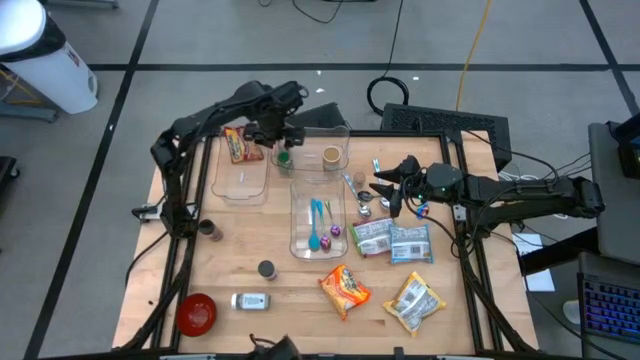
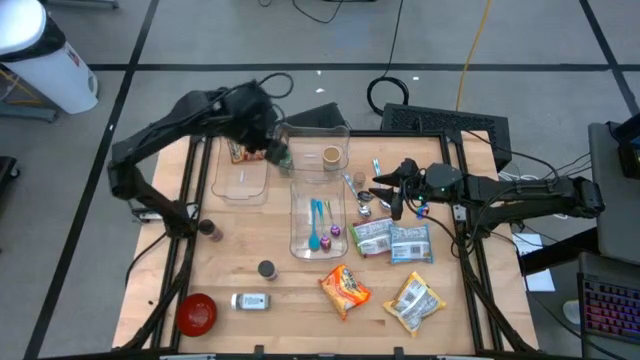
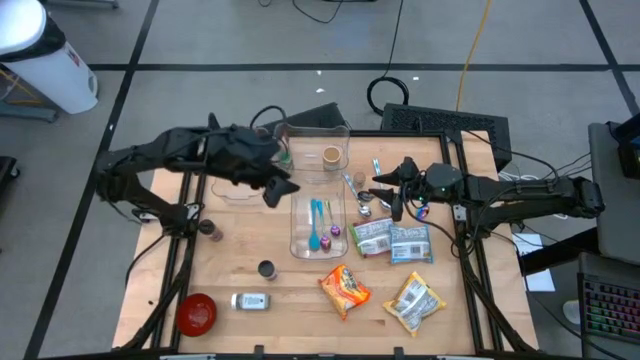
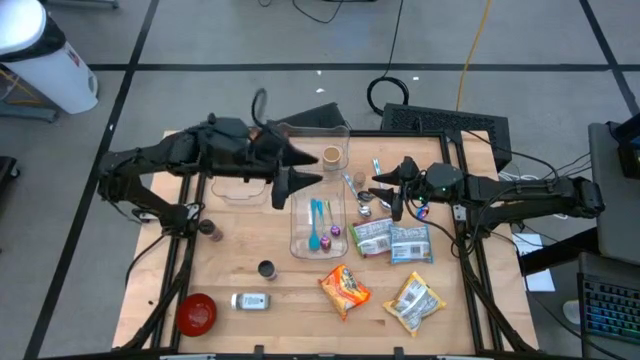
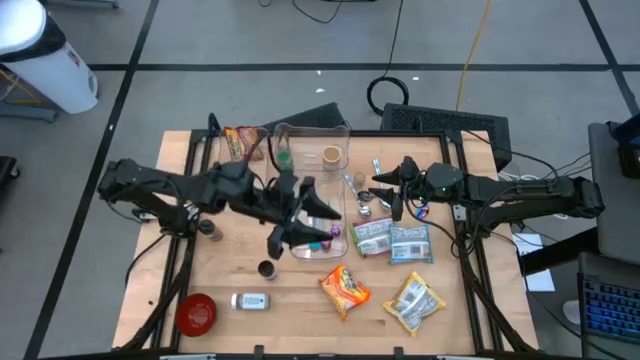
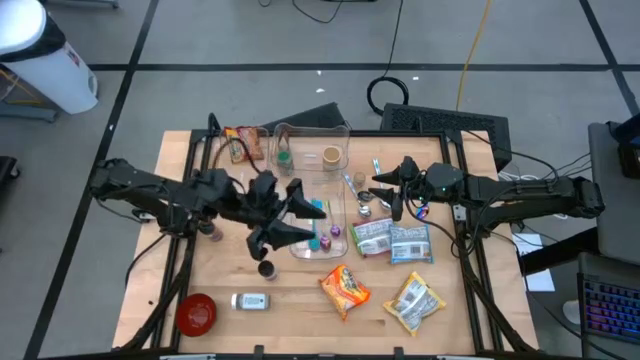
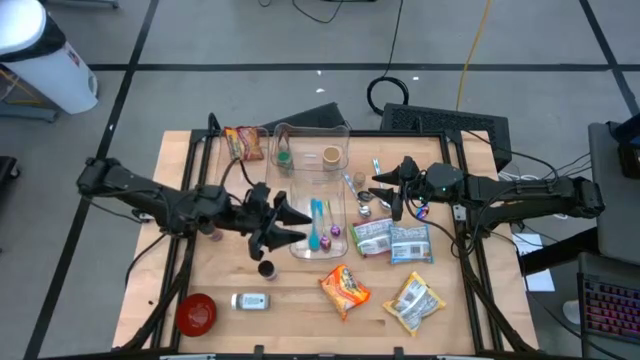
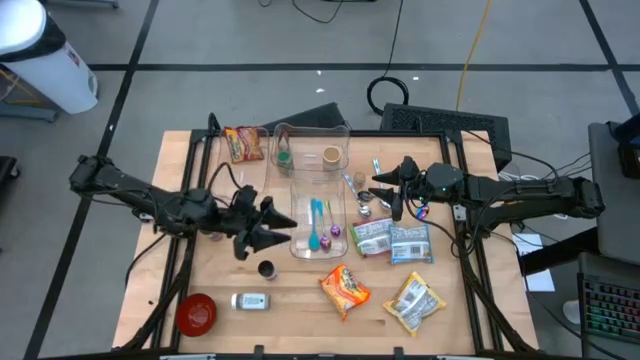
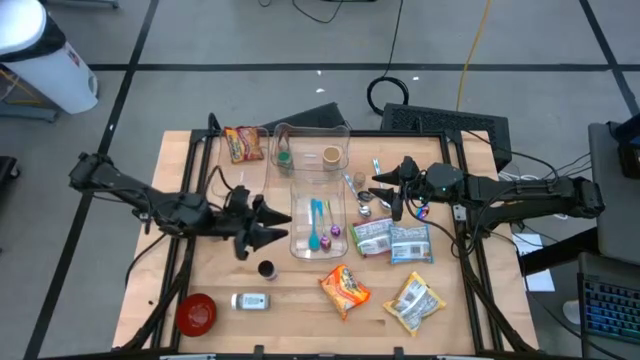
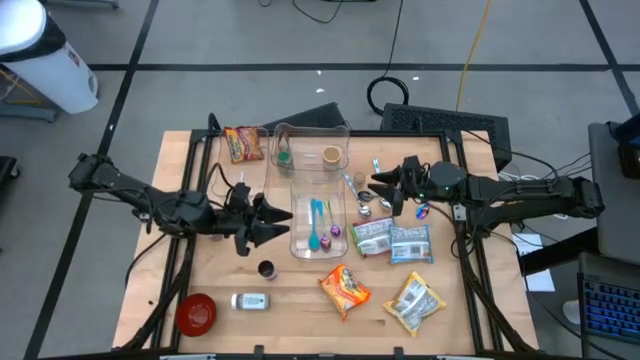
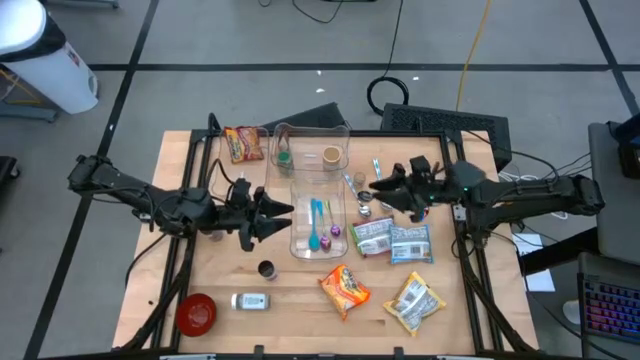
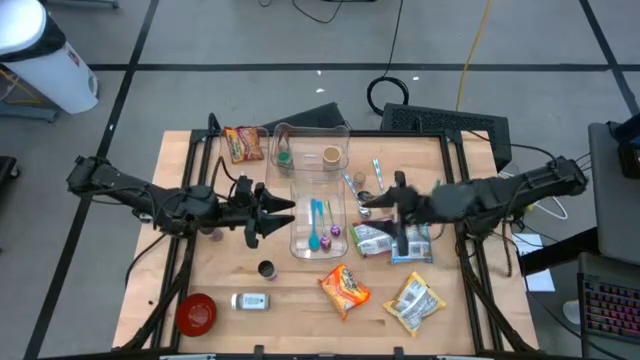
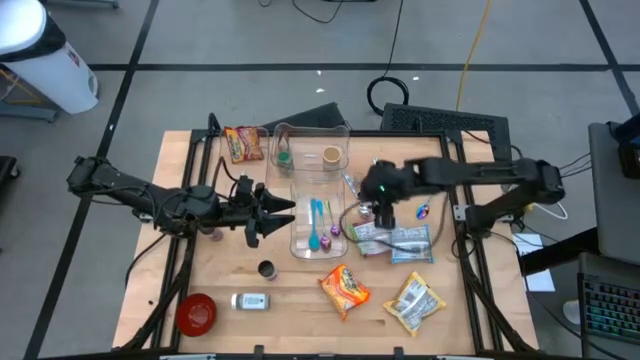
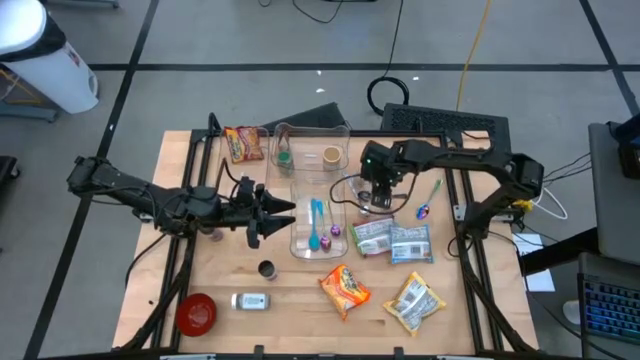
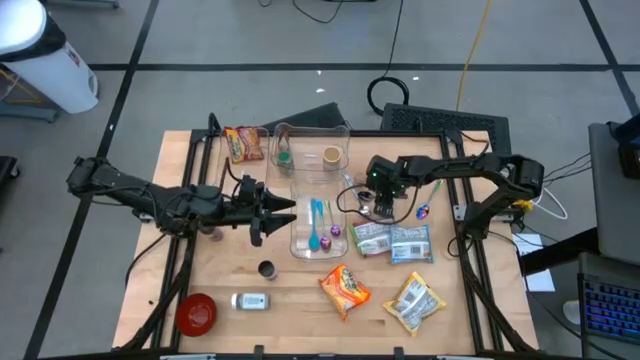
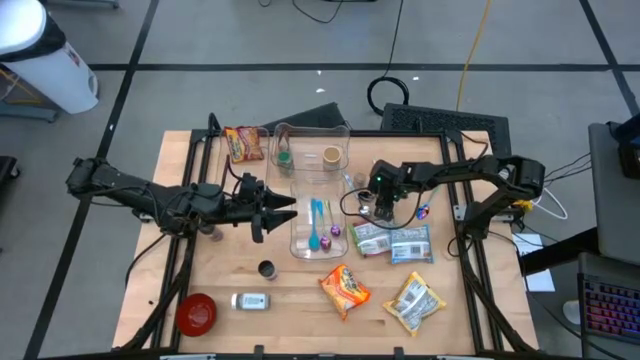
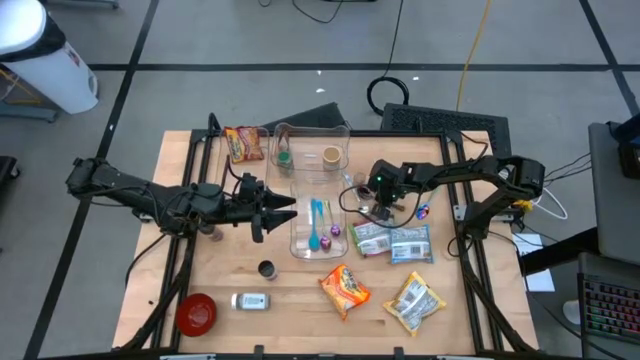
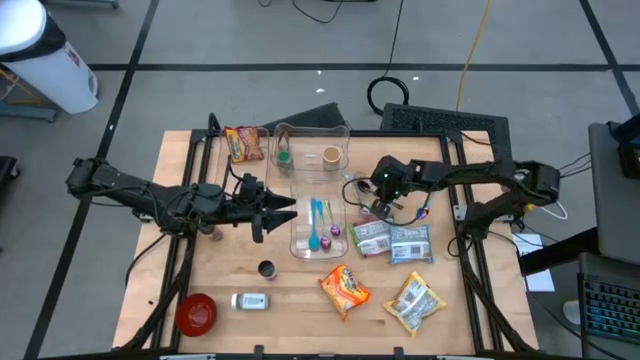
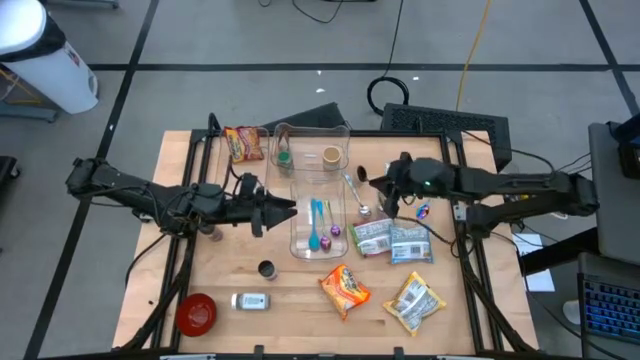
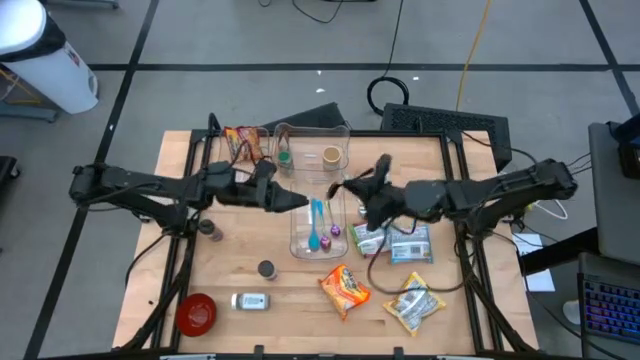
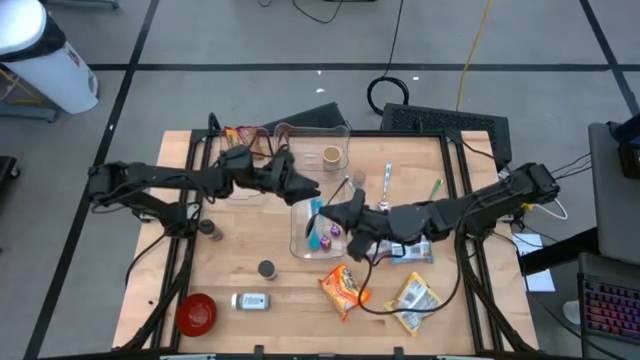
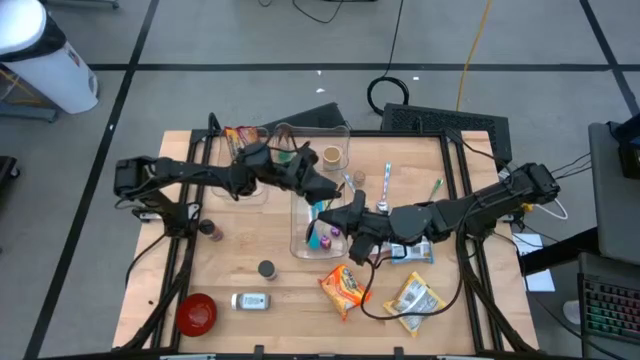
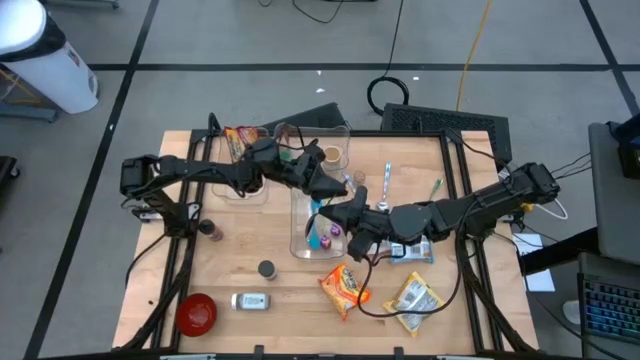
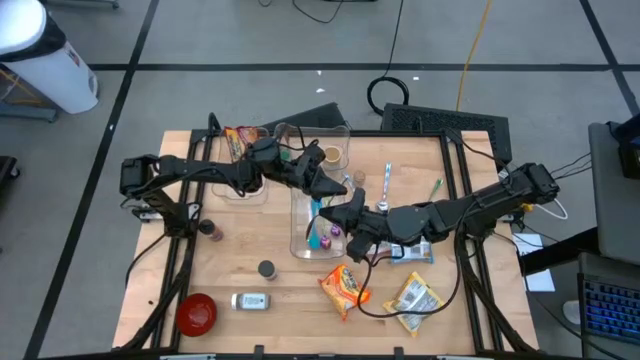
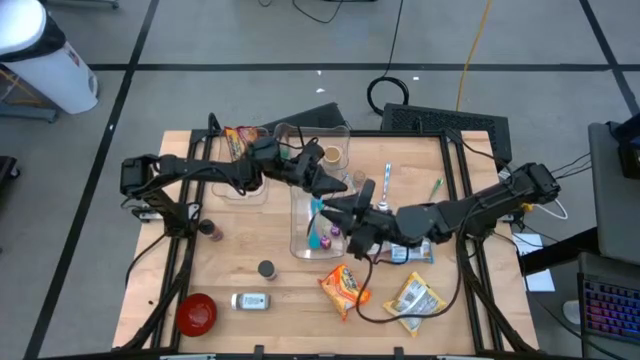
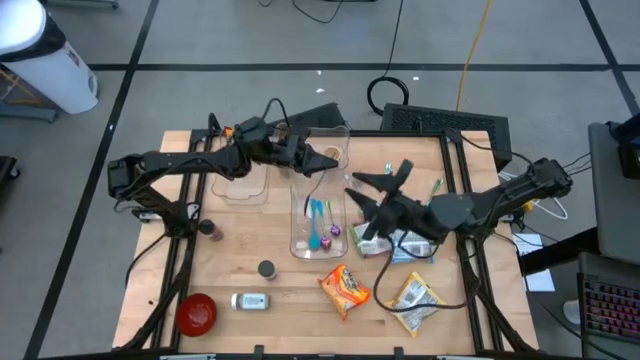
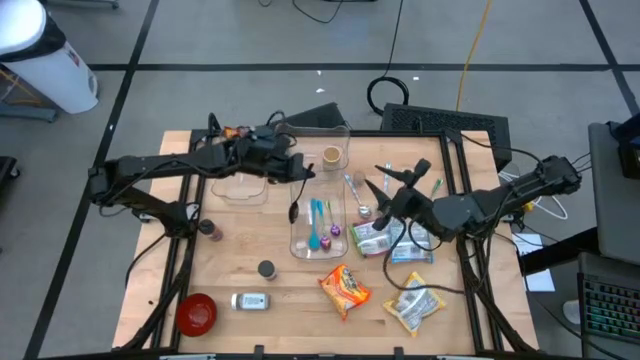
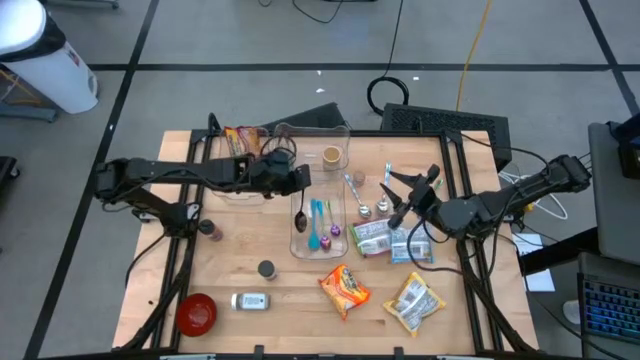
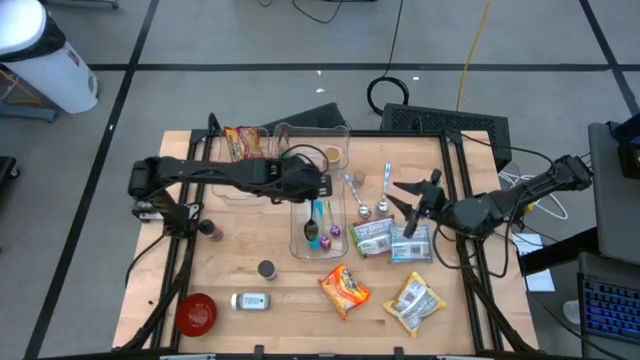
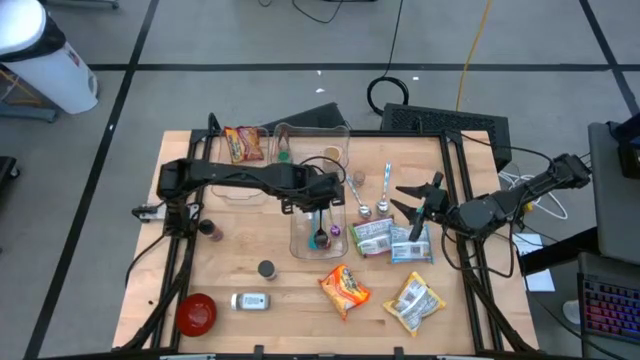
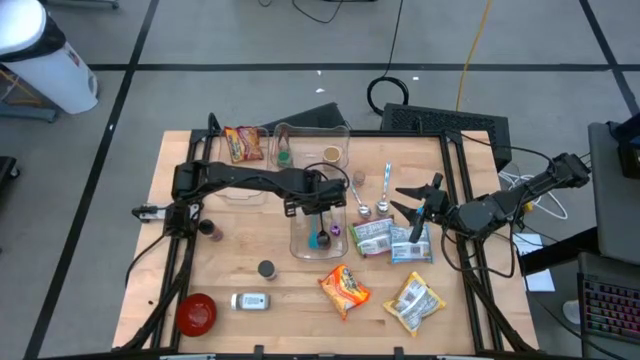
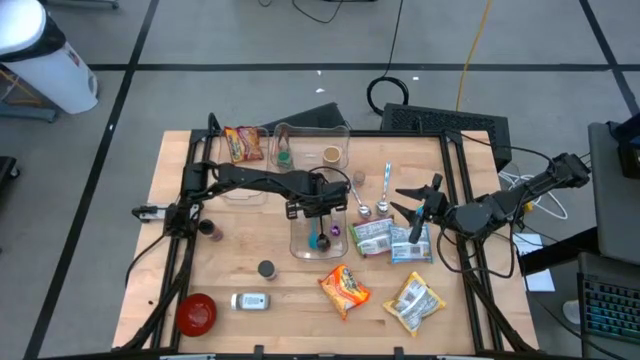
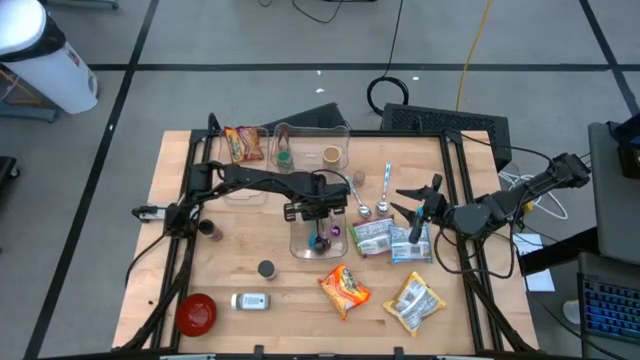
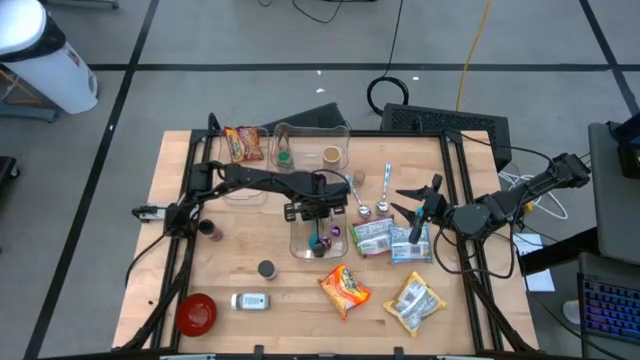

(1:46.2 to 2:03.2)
Task: Pick & Place Food Item
Put the black spoon into the bottom right transparent bin
